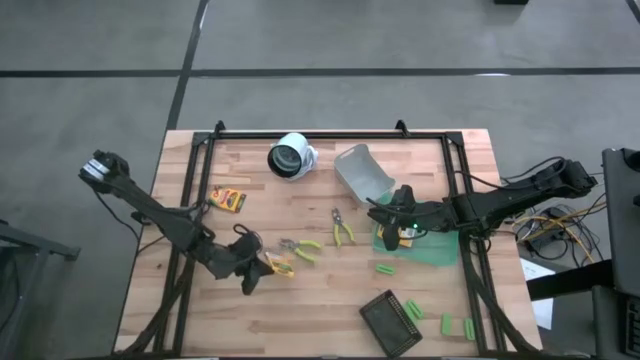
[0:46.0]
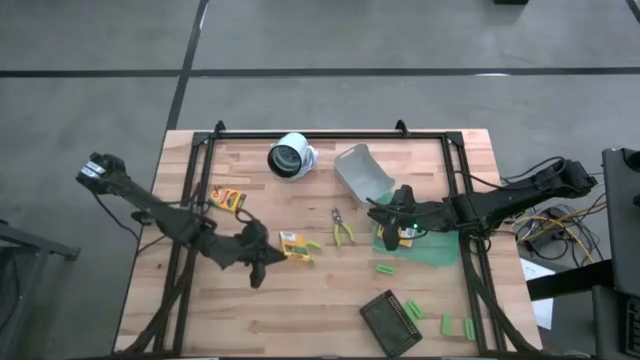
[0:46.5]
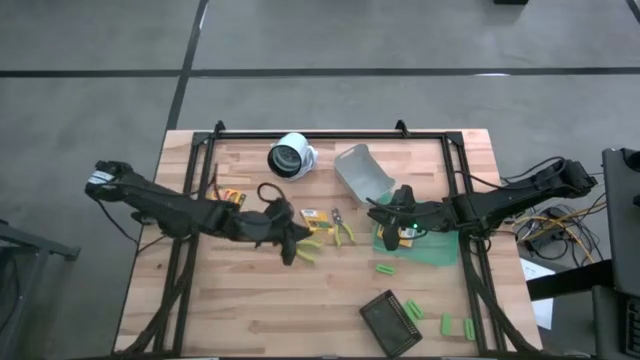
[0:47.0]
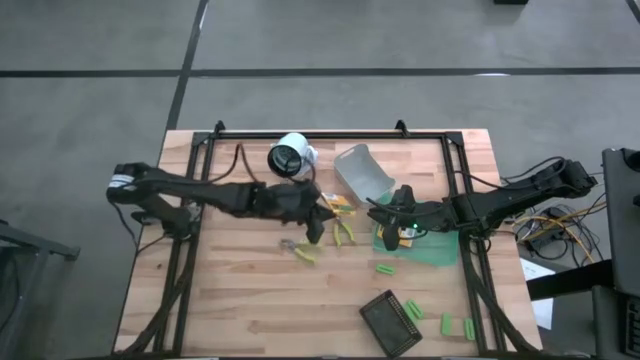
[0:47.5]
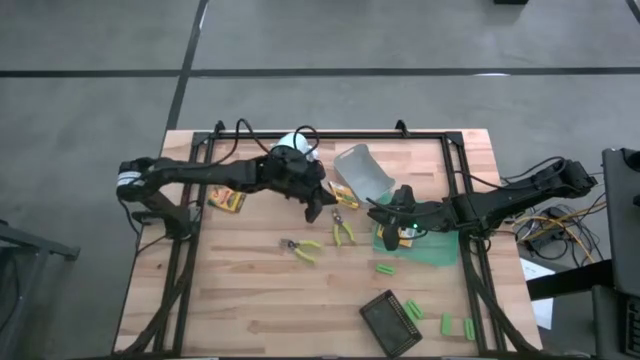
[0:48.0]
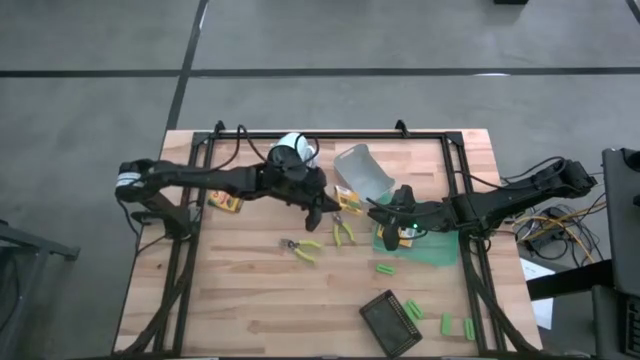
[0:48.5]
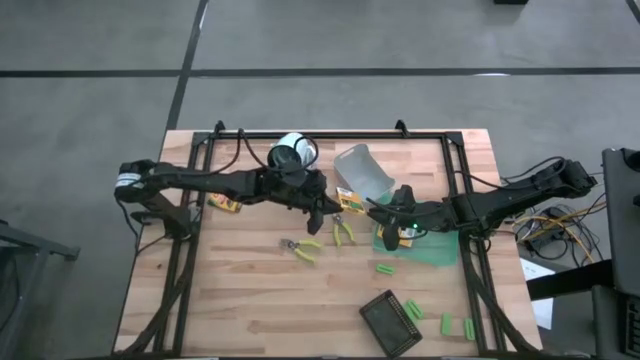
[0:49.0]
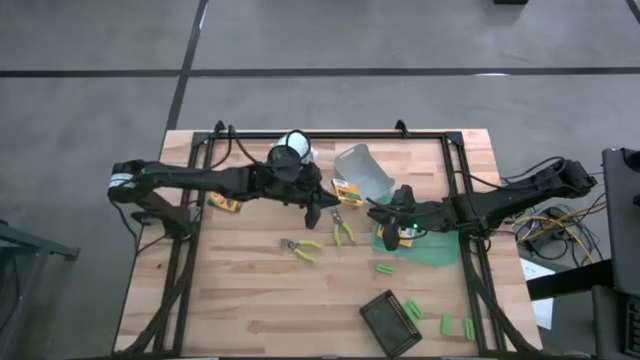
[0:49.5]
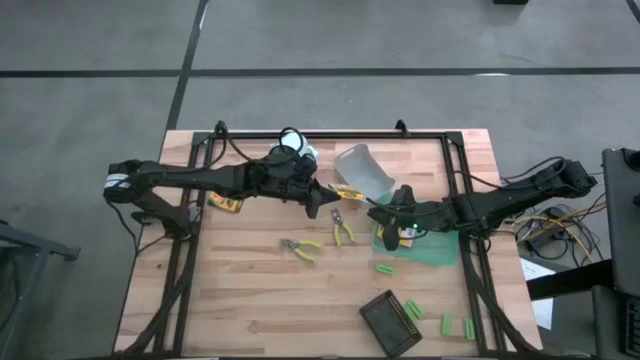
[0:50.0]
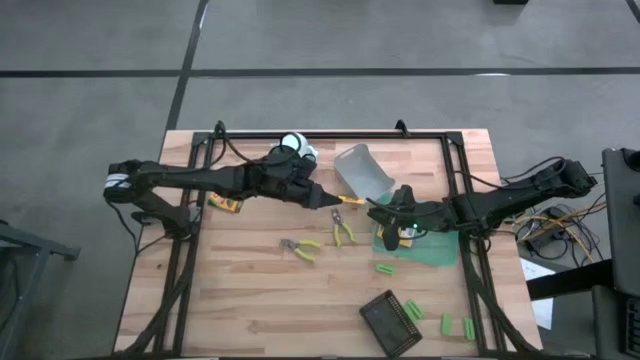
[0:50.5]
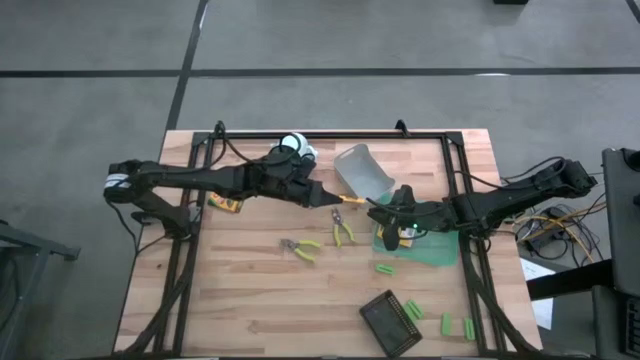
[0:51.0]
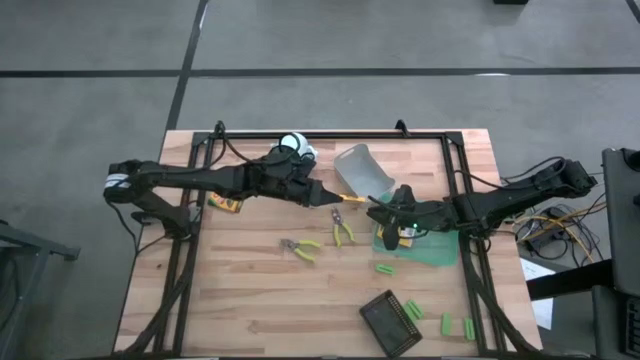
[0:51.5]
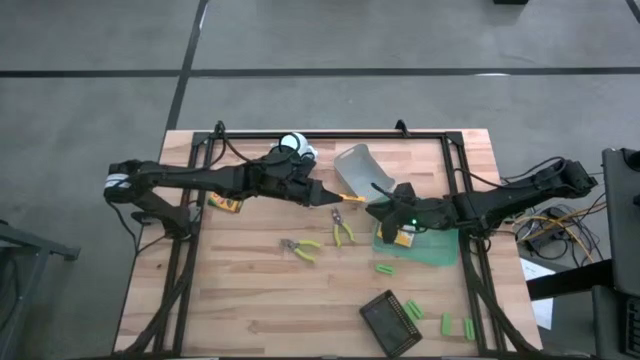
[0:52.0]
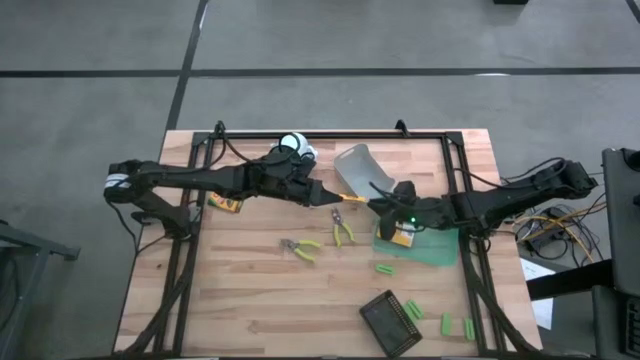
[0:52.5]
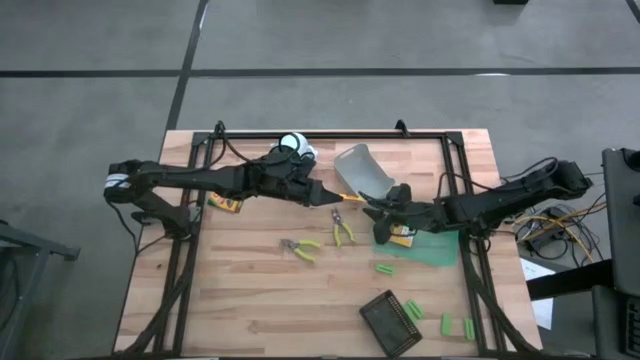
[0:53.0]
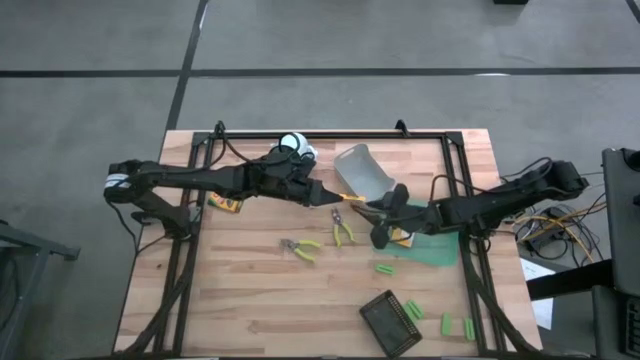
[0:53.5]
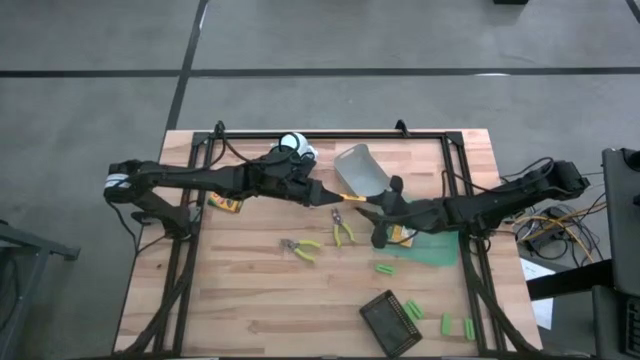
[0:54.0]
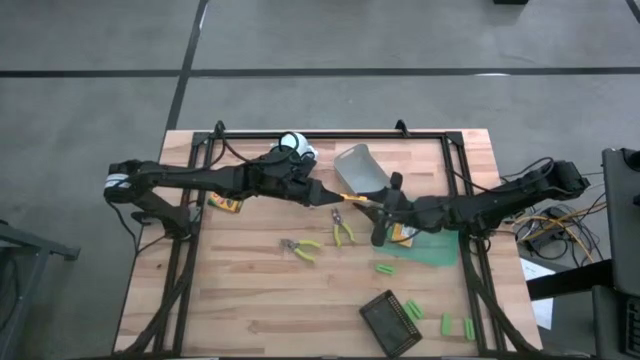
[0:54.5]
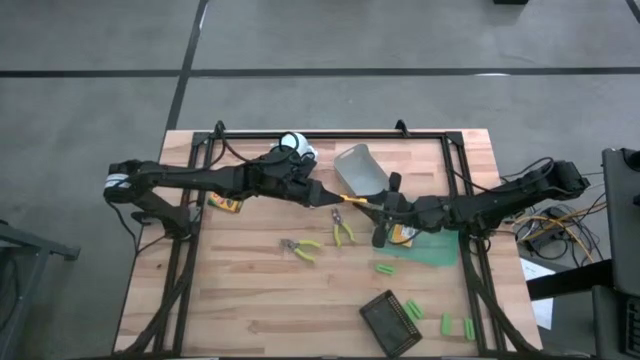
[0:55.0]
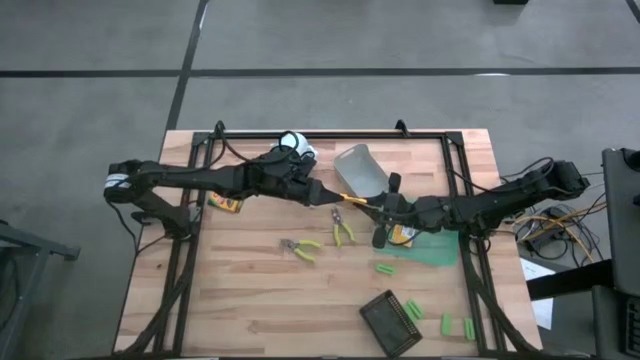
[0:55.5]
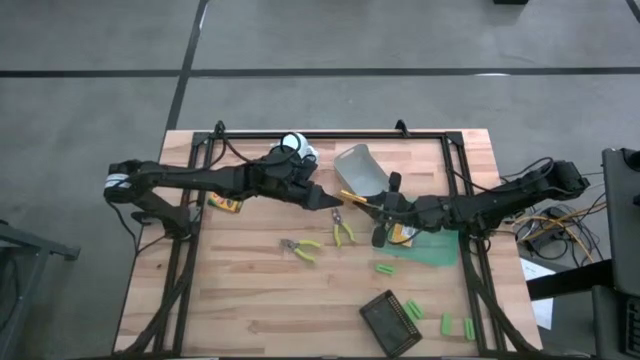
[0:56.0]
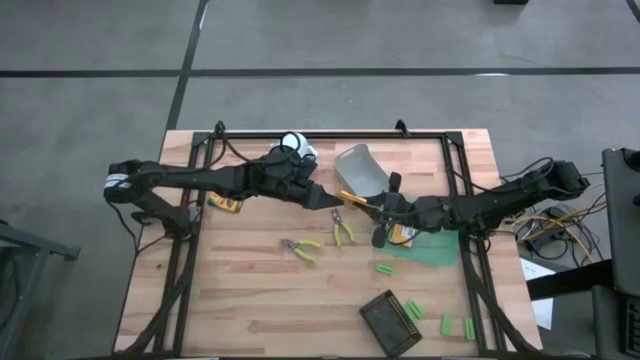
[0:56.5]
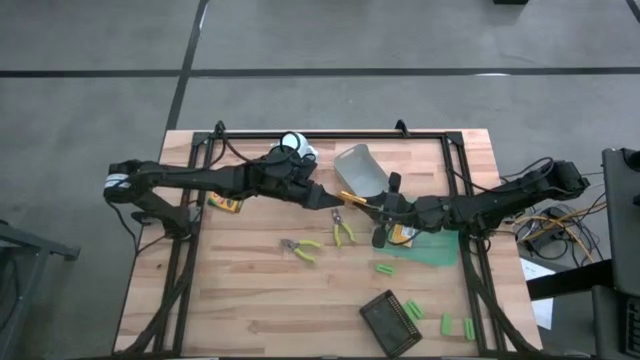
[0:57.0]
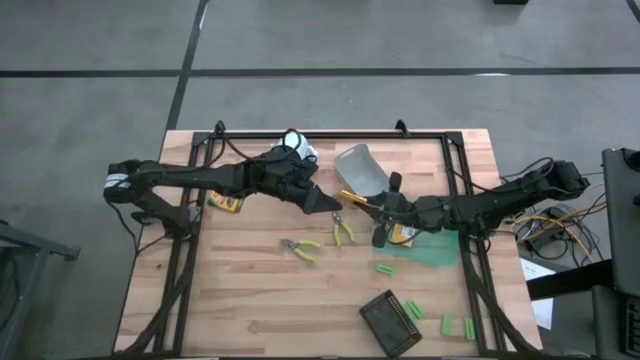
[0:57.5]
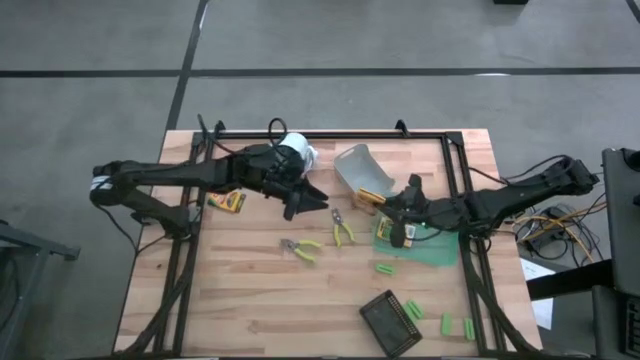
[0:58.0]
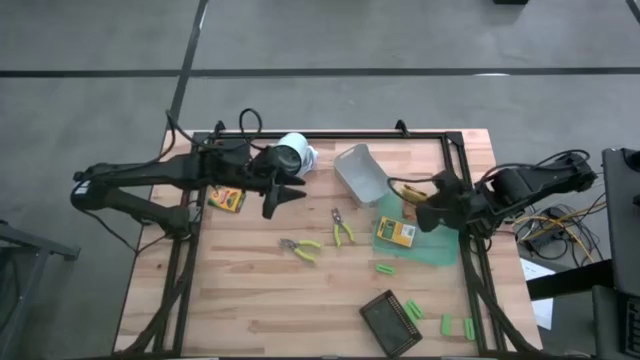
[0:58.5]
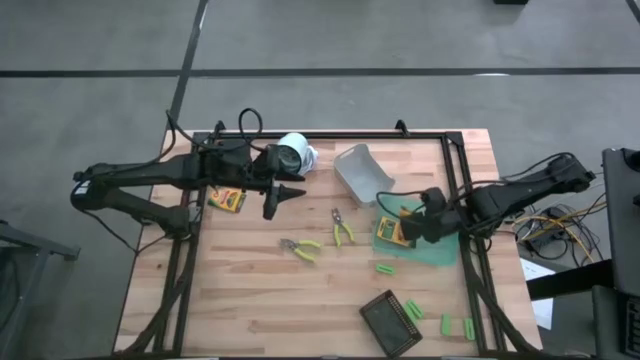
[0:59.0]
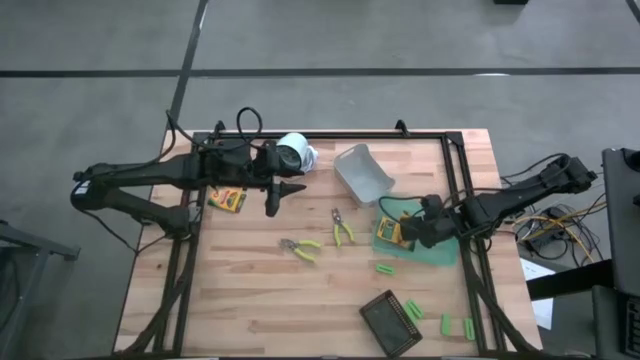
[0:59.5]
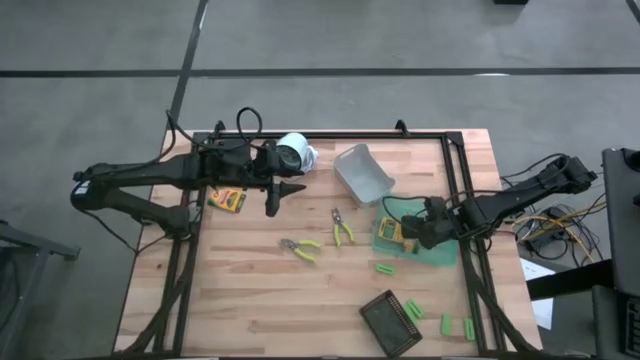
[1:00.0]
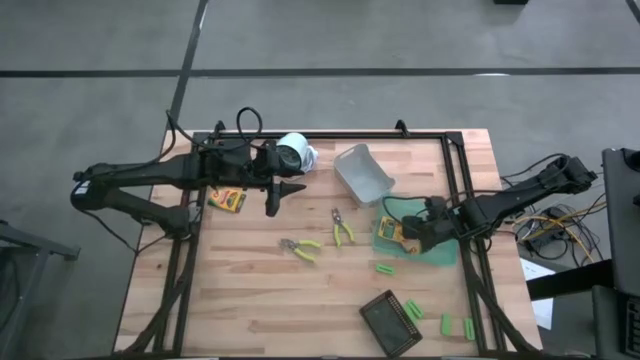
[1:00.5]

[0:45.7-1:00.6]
Task: Pick & Place School Supplies
Put the yellow crayon box into the green bin

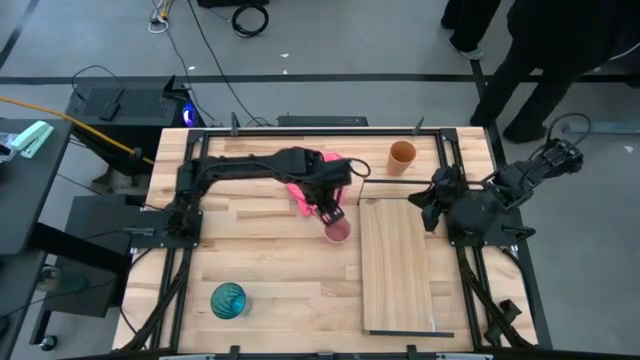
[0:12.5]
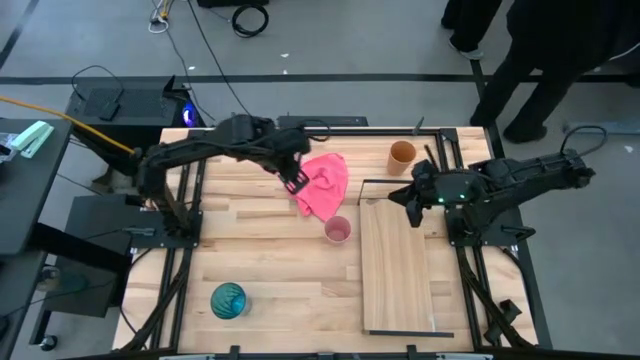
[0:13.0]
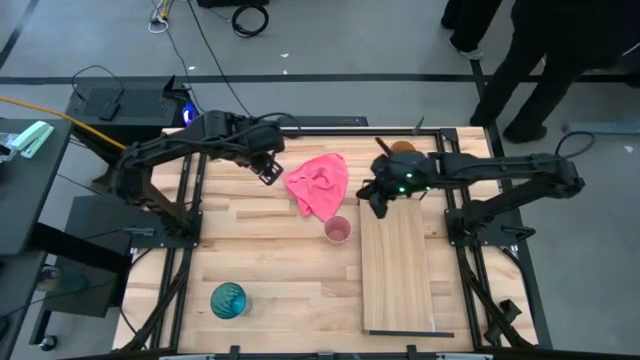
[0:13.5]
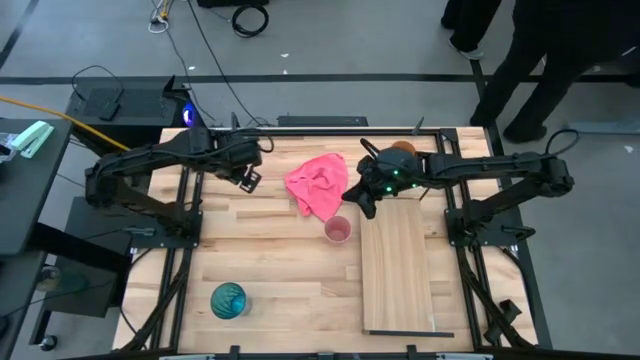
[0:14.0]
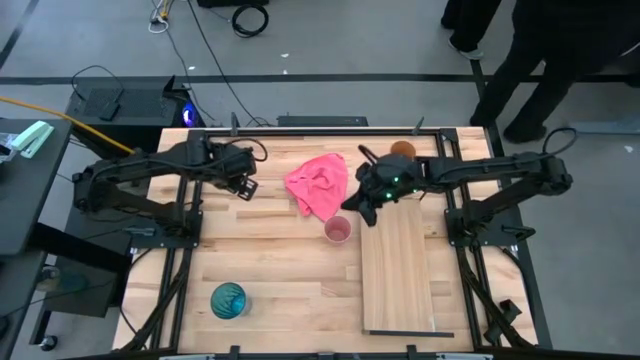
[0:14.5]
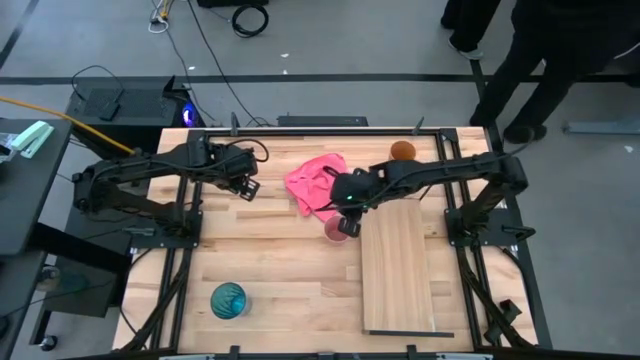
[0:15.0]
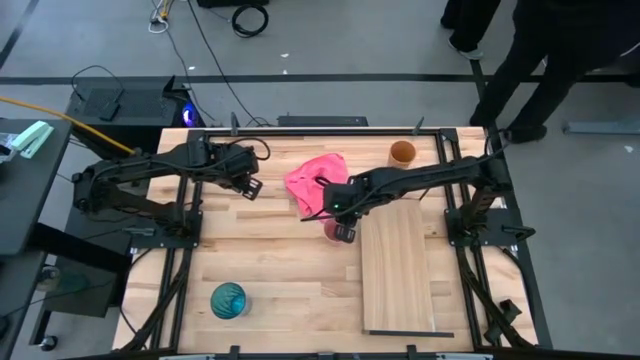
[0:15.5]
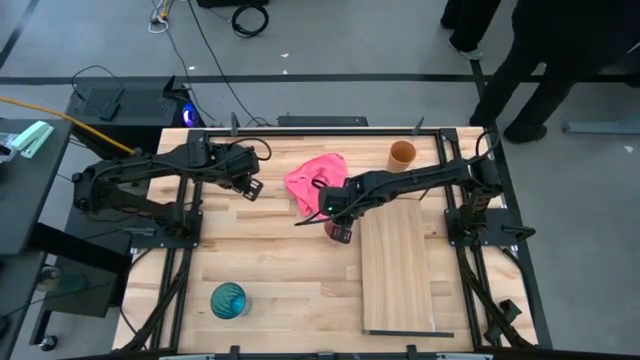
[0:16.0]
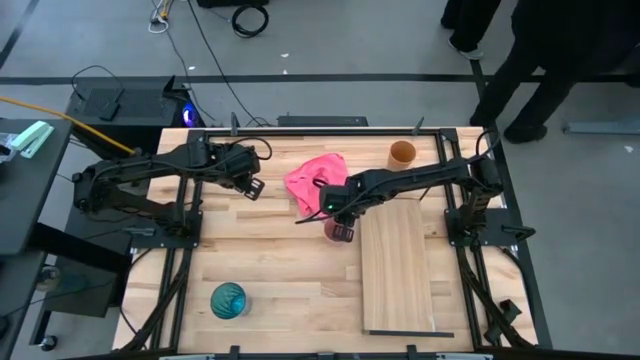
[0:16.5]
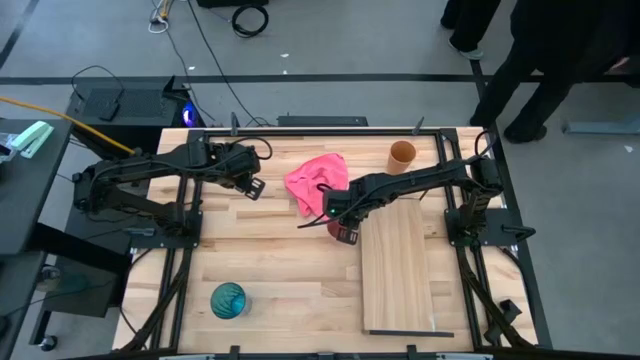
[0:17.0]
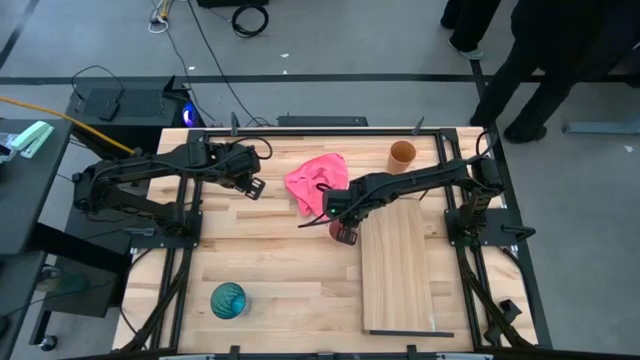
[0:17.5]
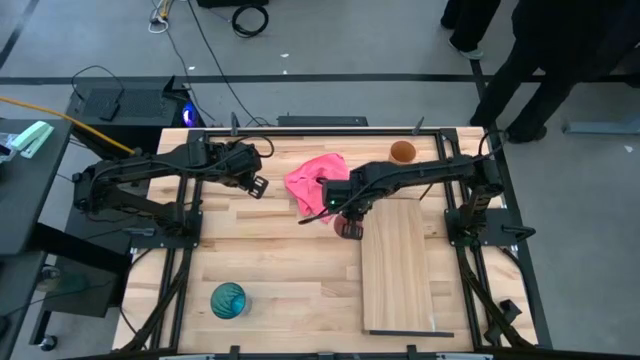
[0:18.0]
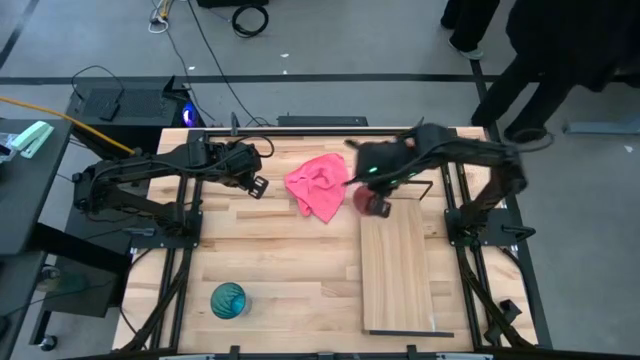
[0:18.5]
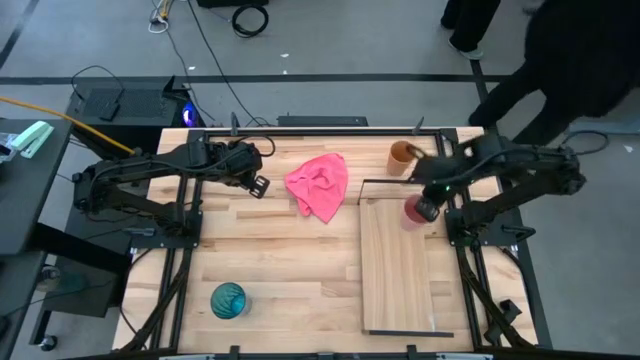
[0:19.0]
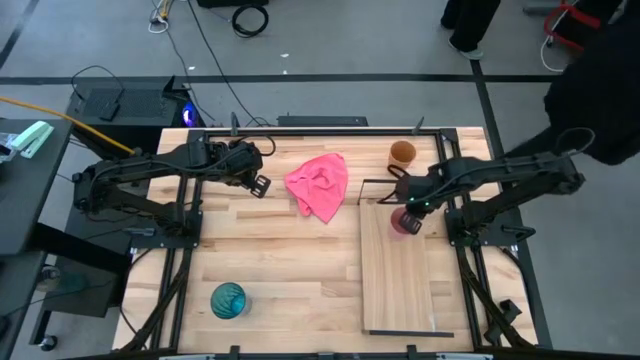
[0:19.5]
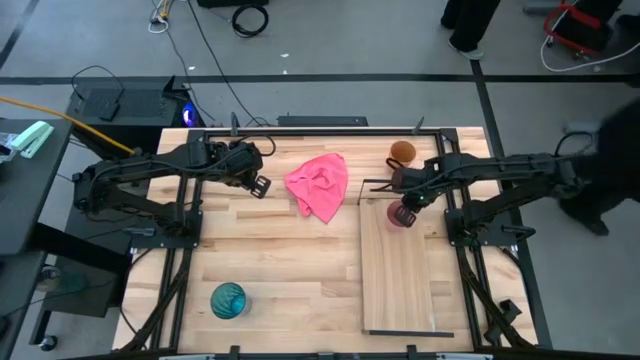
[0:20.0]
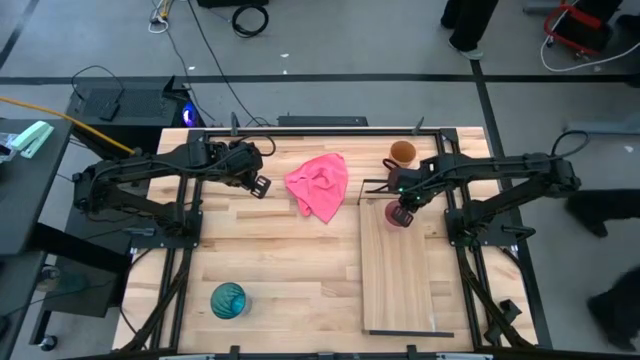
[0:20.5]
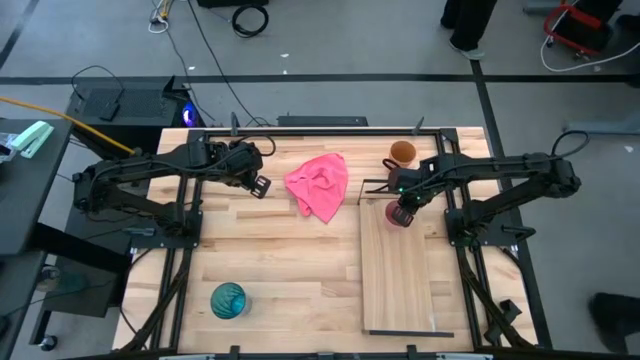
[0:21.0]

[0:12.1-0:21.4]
Task: Stack small to large cups/mugs on shelf
Put the pink plastic glass on the shelf
